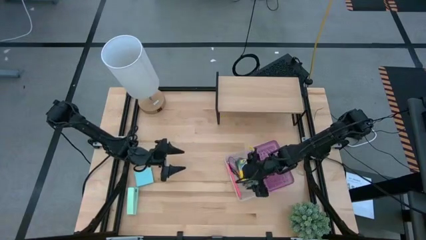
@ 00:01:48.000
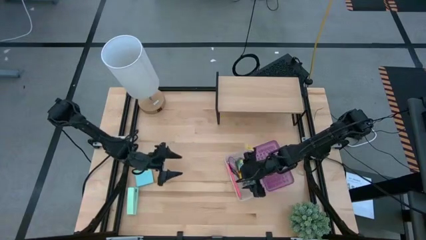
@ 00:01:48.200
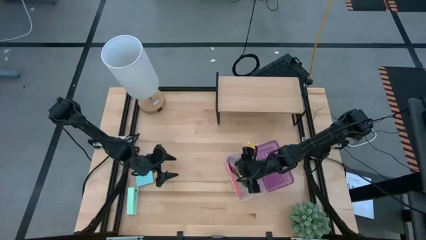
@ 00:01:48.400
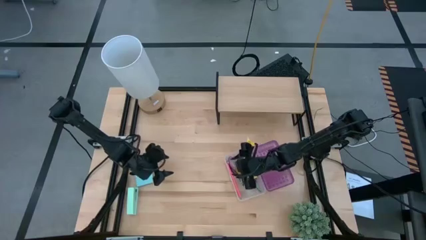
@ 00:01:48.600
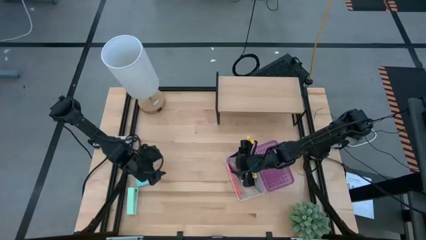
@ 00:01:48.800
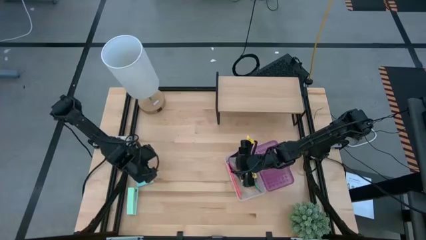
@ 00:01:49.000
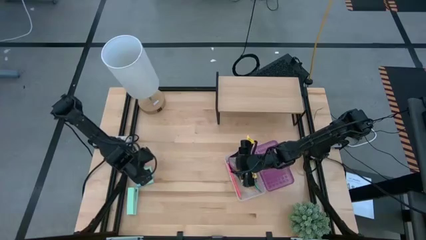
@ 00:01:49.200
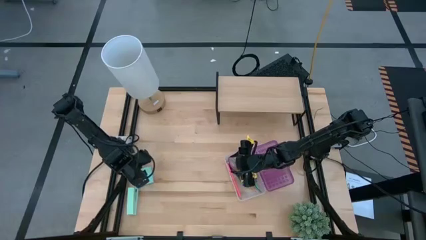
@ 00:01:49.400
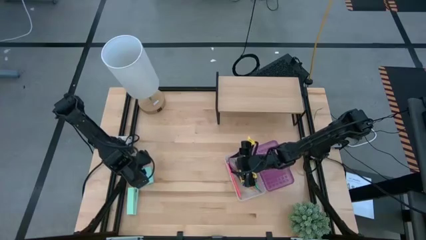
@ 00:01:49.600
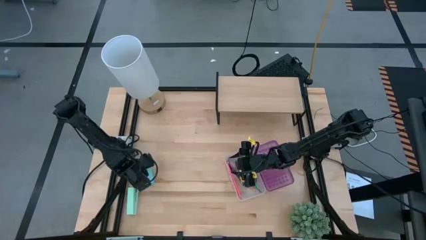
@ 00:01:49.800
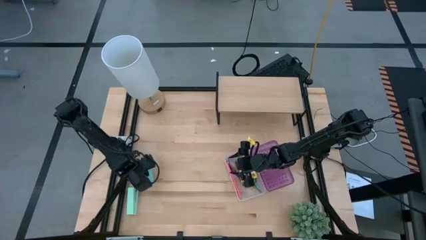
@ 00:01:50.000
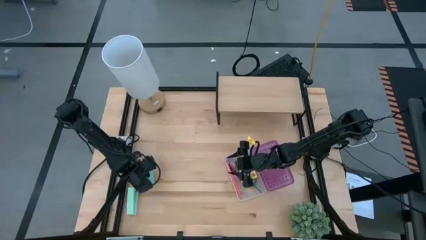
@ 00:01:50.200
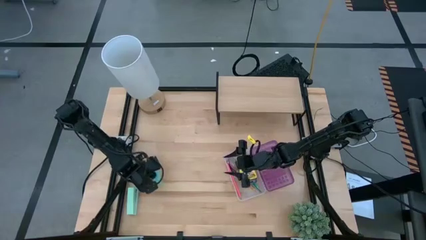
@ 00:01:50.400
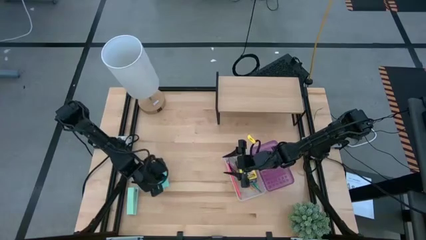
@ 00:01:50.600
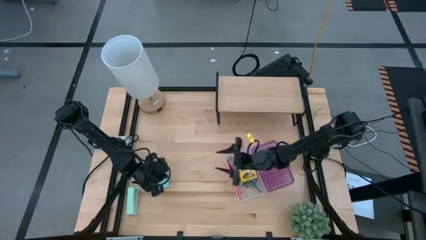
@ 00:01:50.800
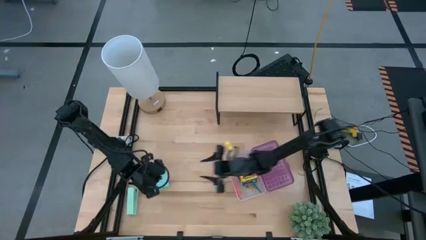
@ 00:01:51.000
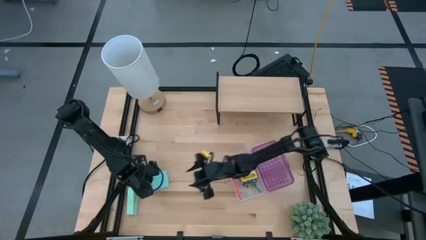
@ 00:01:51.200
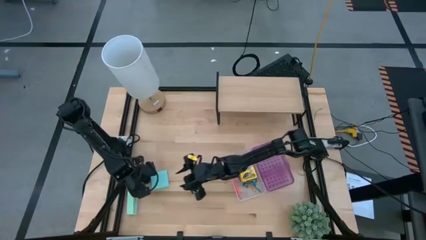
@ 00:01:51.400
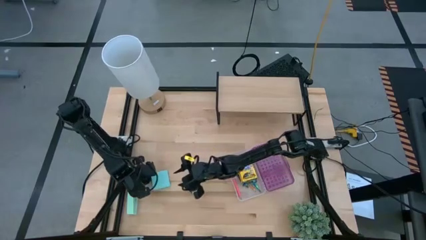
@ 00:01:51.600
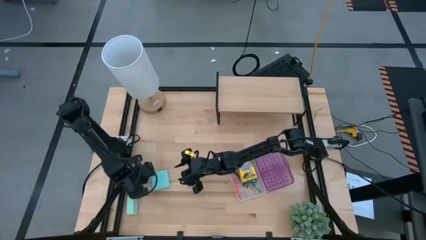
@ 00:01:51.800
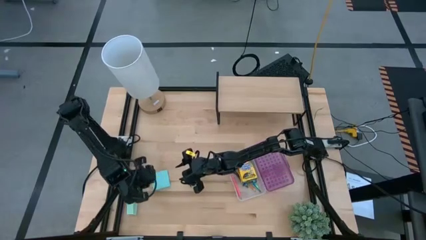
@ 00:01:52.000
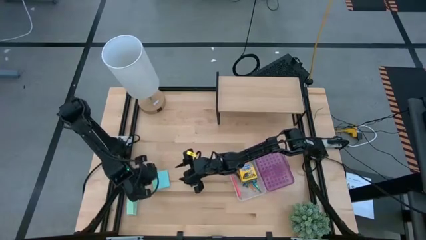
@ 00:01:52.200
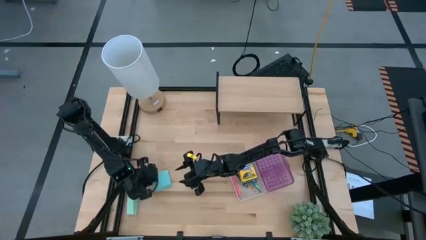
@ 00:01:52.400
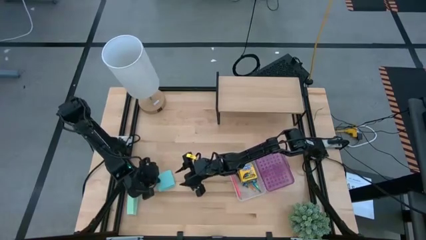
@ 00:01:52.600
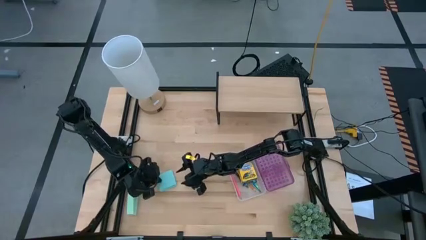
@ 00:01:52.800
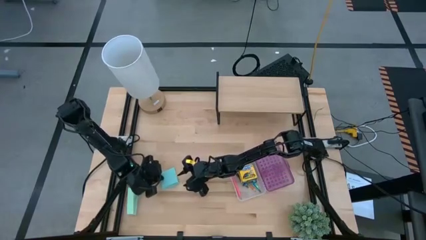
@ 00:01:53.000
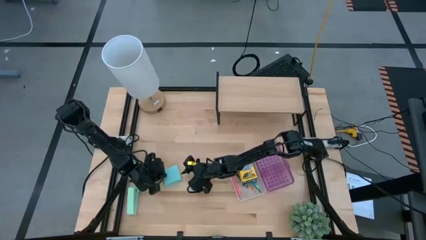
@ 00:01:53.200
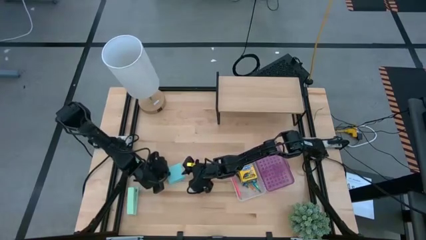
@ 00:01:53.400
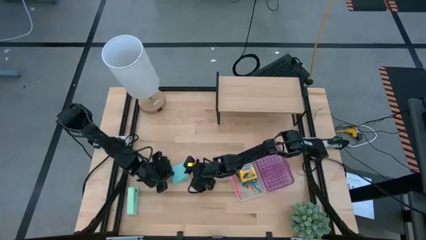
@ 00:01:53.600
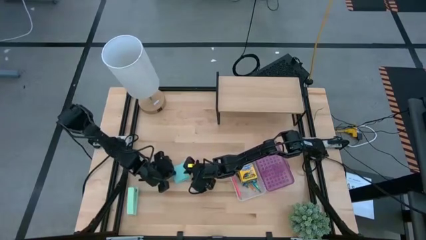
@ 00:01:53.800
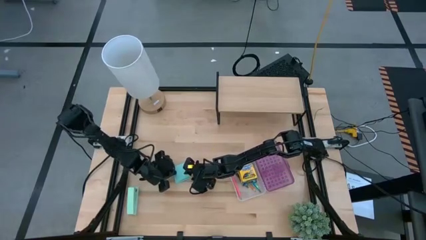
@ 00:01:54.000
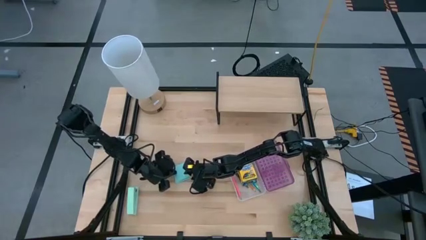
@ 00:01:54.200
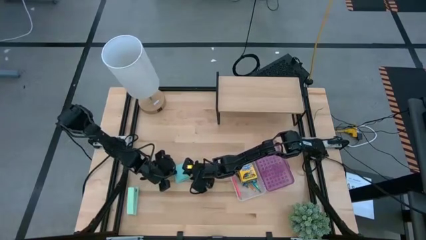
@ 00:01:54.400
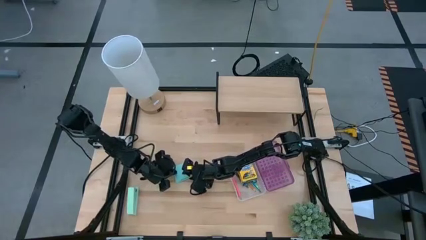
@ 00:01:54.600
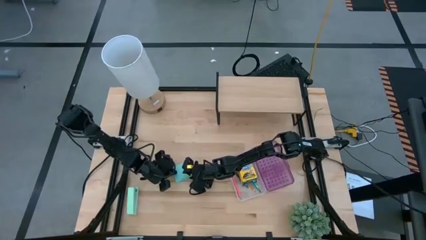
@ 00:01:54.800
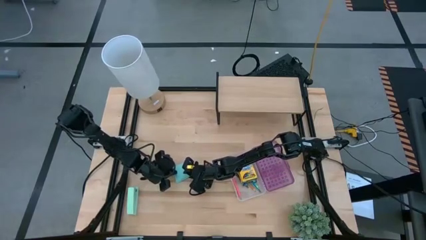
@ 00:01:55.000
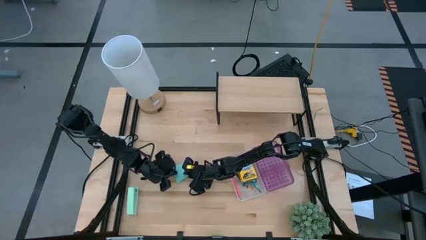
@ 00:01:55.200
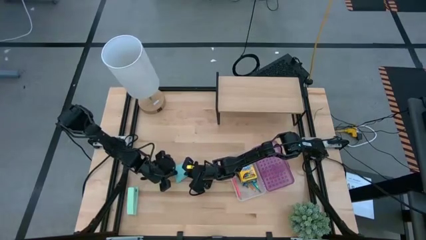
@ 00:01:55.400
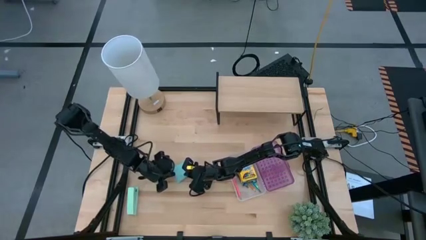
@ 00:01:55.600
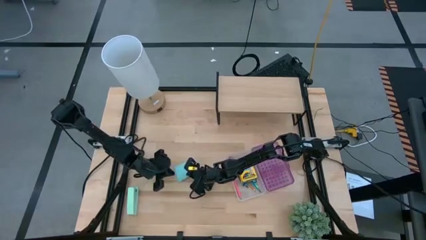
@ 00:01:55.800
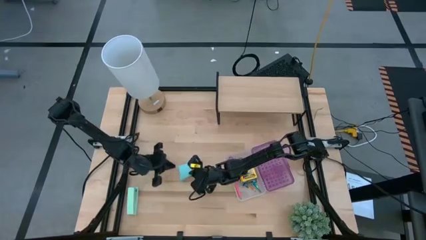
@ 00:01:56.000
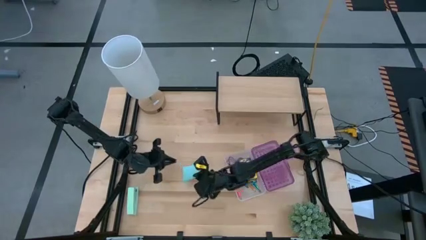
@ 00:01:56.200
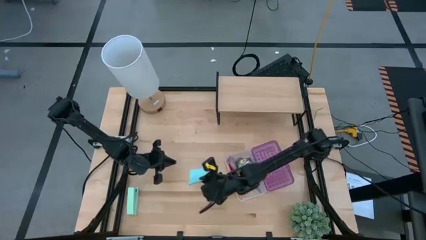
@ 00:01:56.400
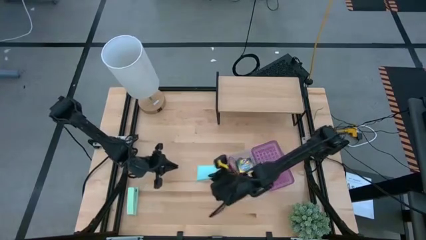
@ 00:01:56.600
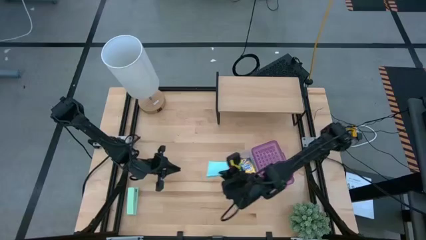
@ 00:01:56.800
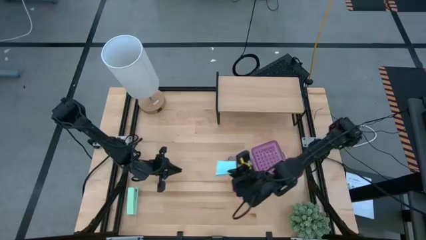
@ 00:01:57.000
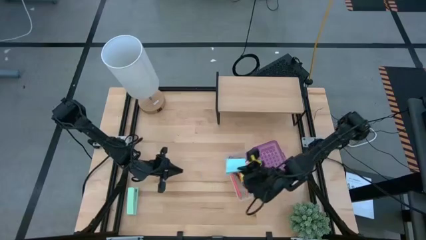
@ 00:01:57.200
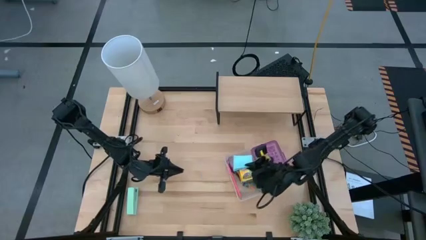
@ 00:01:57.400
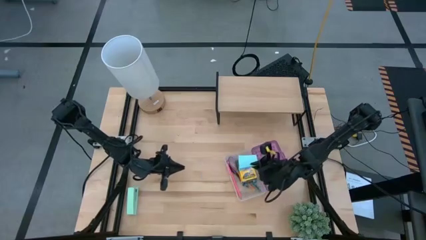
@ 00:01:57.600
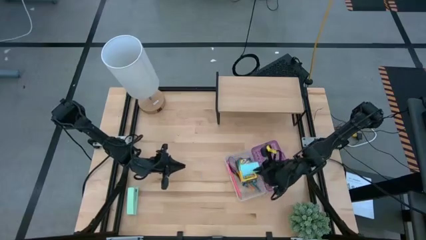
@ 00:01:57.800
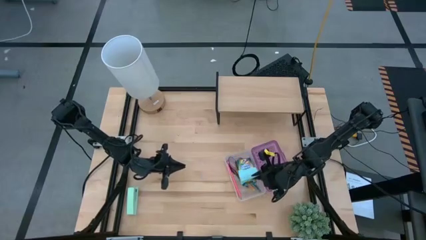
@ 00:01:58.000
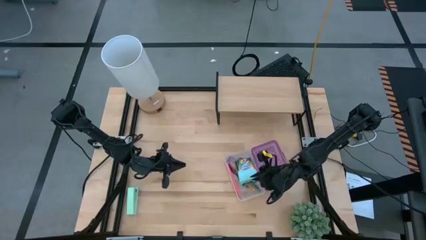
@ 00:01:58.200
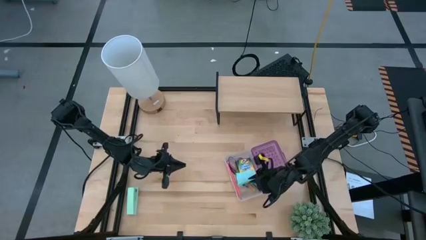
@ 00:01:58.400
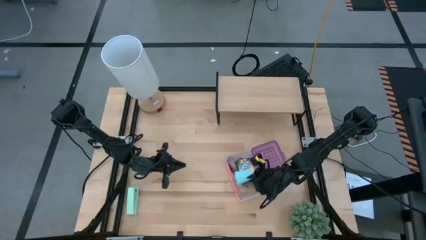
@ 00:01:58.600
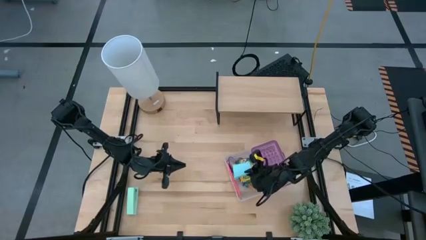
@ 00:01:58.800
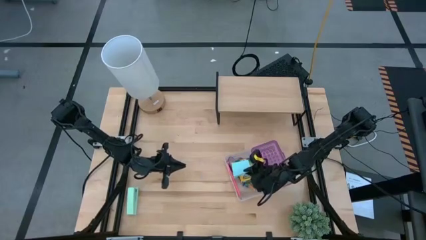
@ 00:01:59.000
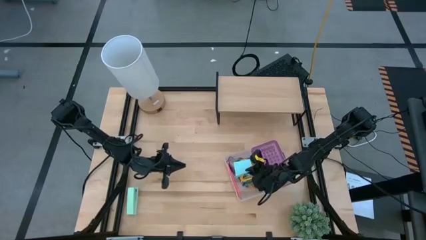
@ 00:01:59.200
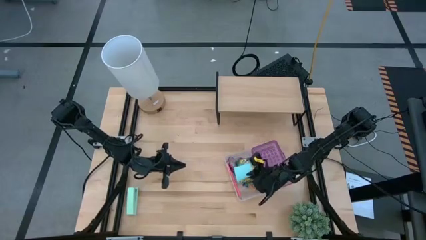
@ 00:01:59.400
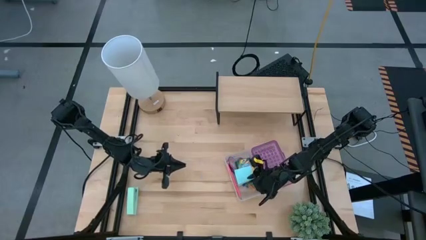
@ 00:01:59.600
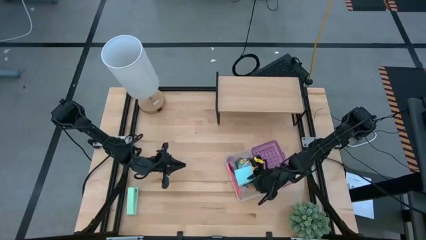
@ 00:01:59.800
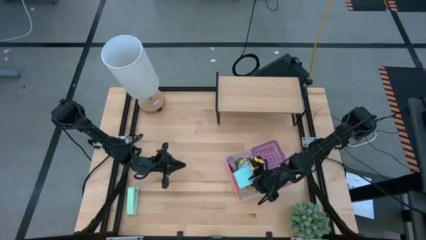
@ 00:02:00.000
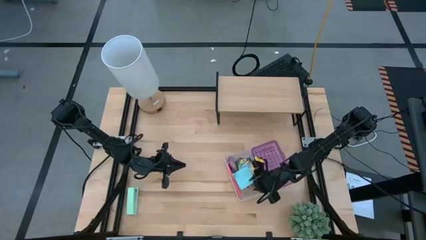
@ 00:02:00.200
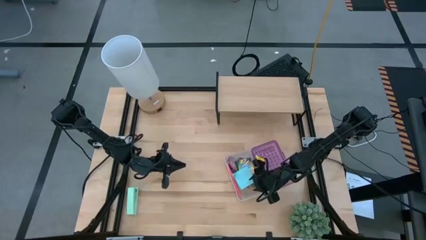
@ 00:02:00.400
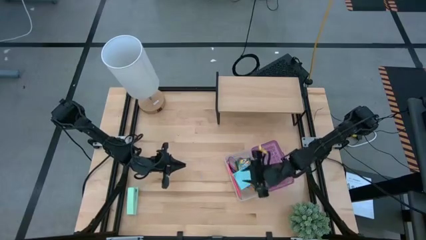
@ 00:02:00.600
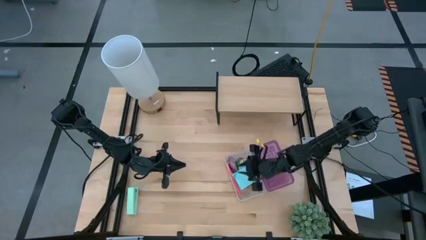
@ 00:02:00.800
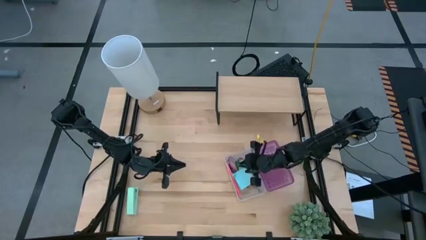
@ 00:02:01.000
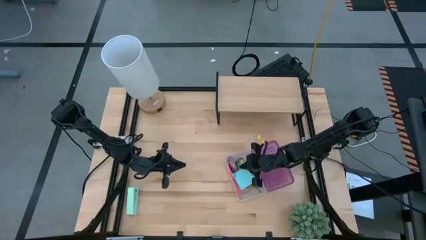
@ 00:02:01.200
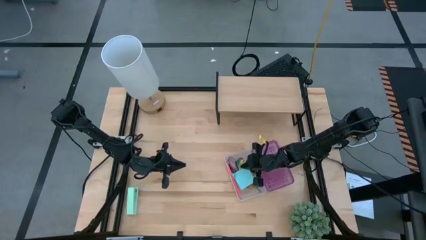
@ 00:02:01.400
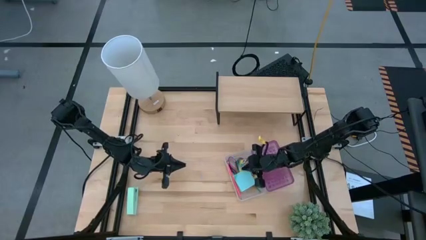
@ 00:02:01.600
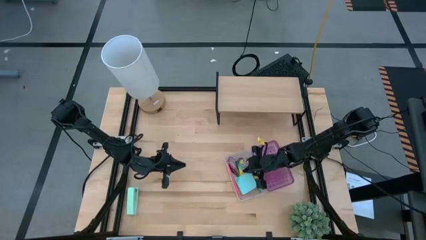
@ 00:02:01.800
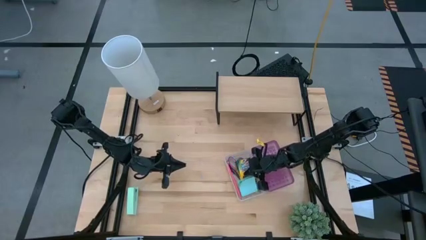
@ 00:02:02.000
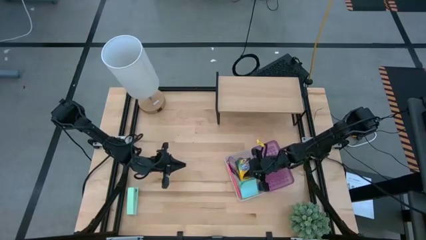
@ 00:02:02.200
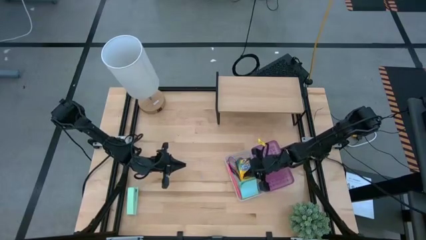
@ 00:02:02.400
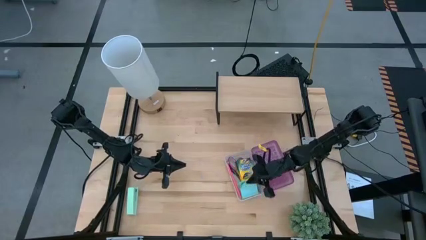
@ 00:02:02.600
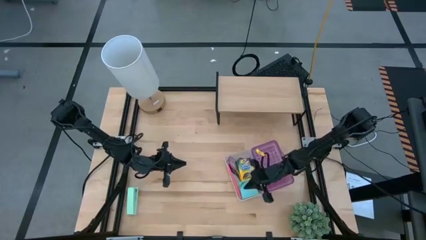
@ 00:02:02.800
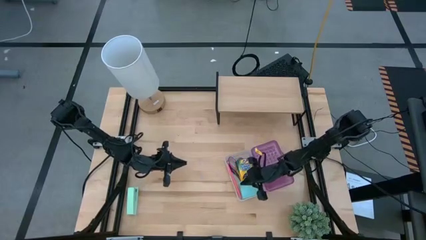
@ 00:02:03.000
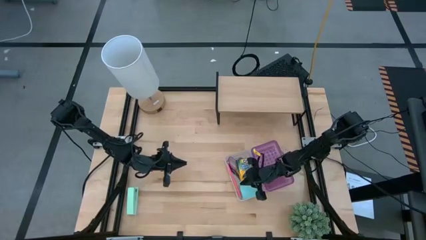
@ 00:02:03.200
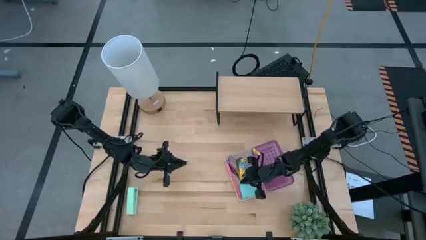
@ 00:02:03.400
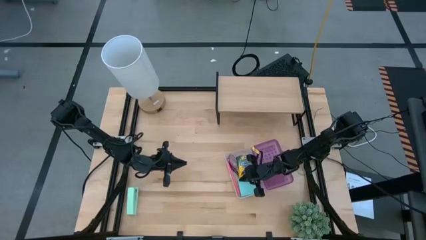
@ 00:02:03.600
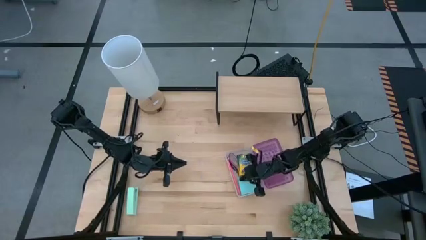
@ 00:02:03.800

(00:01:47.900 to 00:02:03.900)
Task: Pack school essentials
Put the blue sticky notes into the purple supply box
